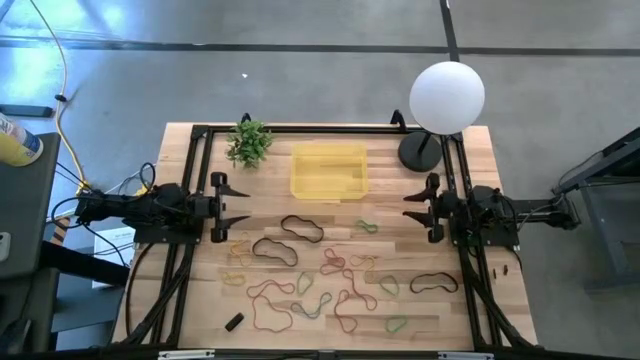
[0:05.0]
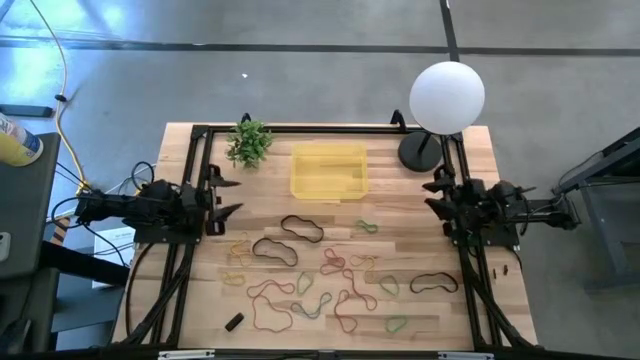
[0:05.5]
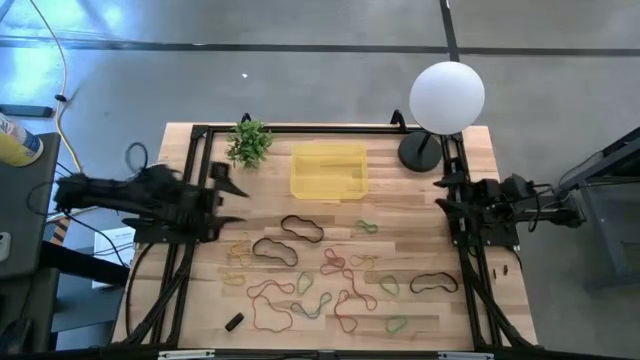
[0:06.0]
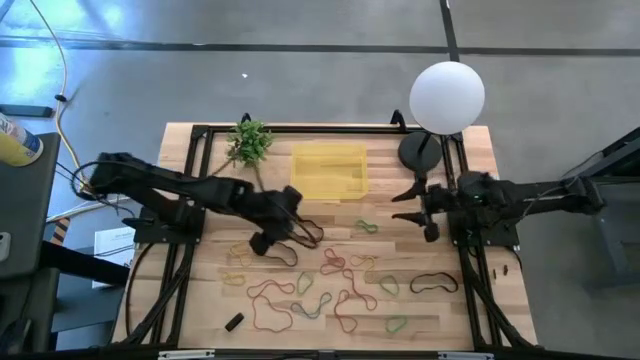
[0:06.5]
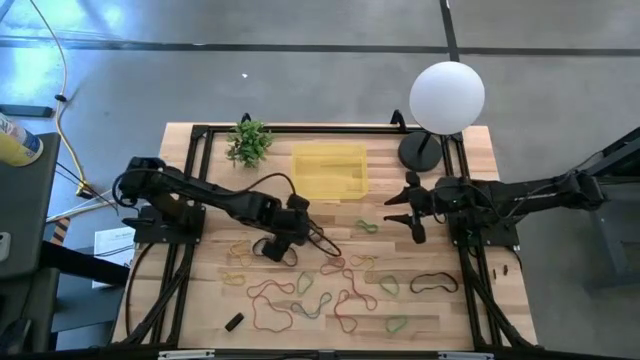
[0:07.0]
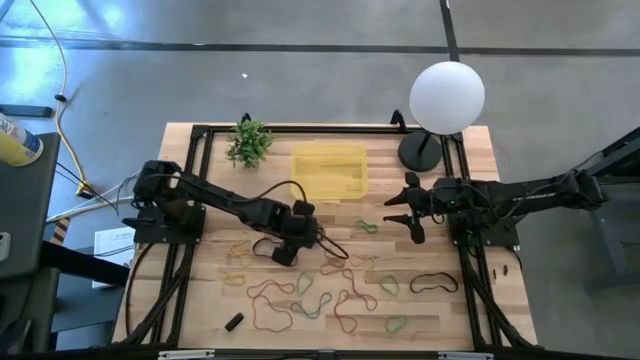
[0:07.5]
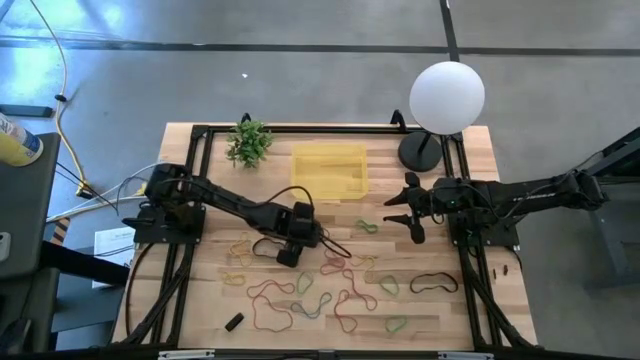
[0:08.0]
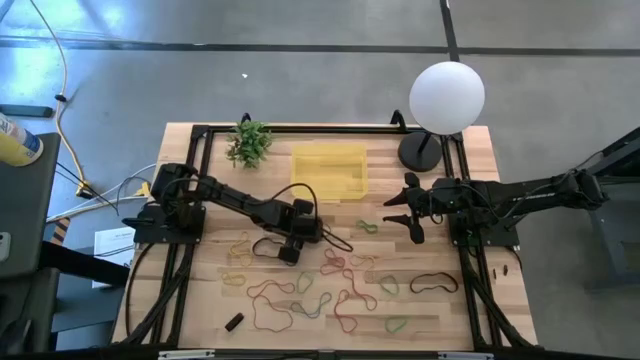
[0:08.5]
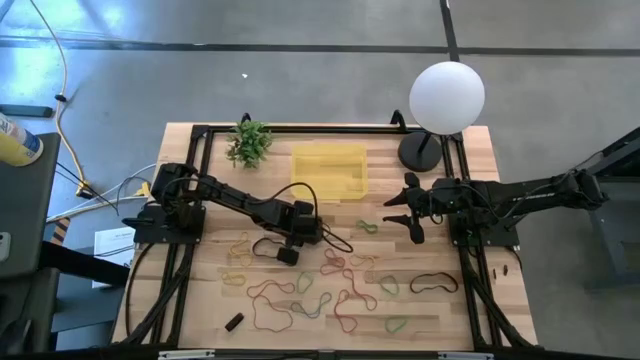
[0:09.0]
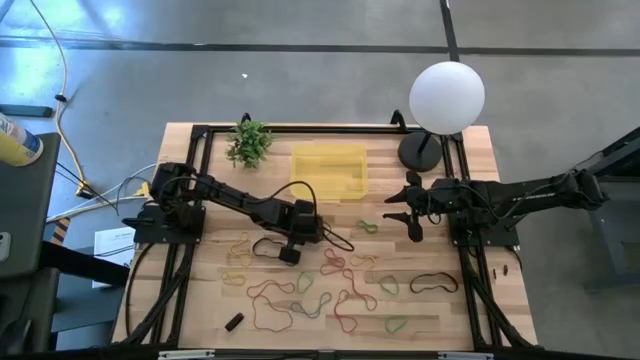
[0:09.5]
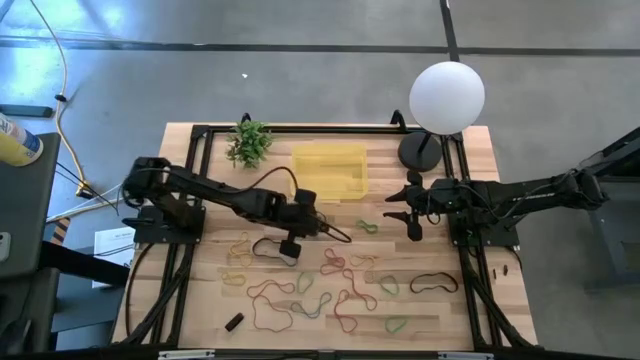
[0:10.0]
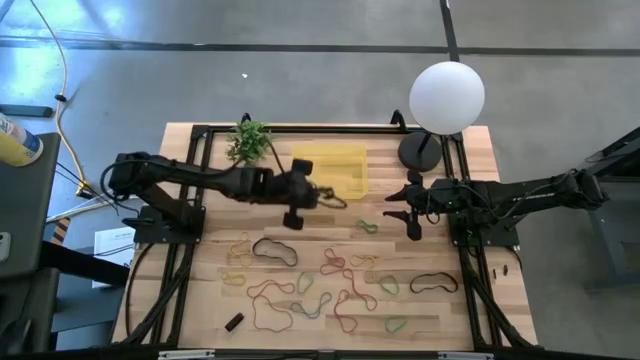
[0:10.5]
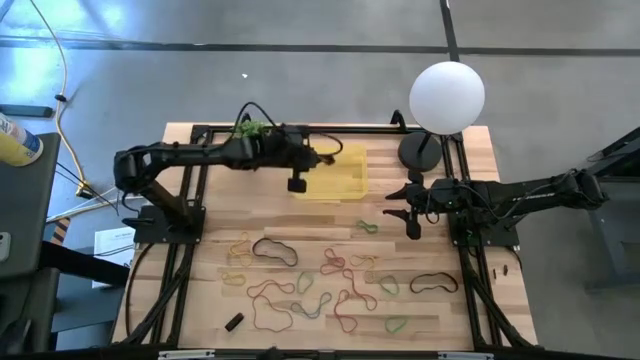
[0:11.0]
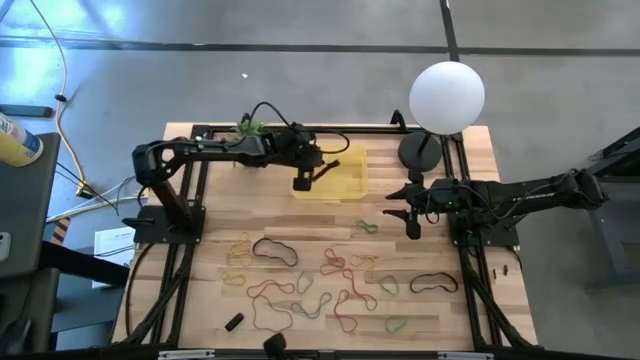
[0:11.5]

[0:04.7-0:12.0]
Task: Pick and place rubber bands into bin
Put the black rubber band into the yellow bin

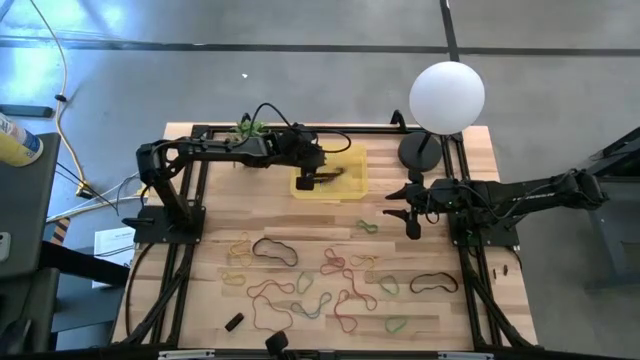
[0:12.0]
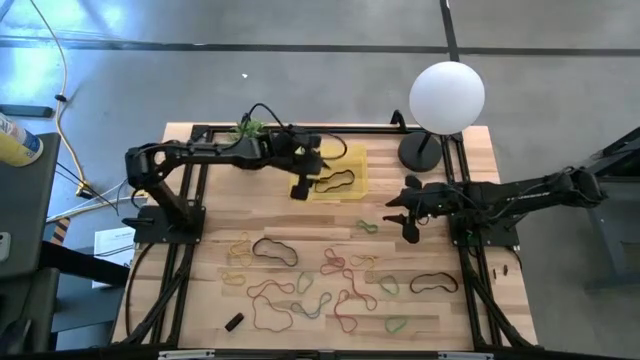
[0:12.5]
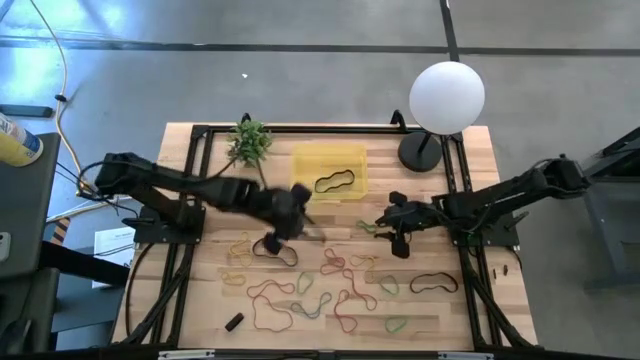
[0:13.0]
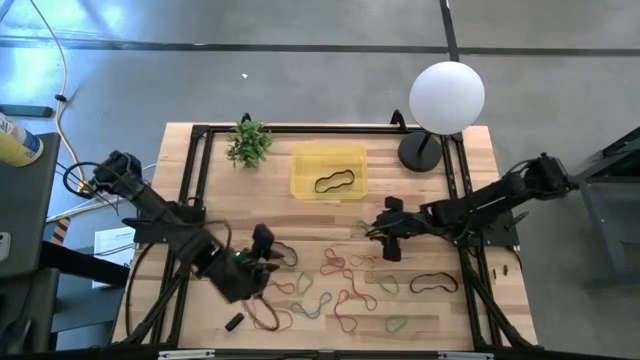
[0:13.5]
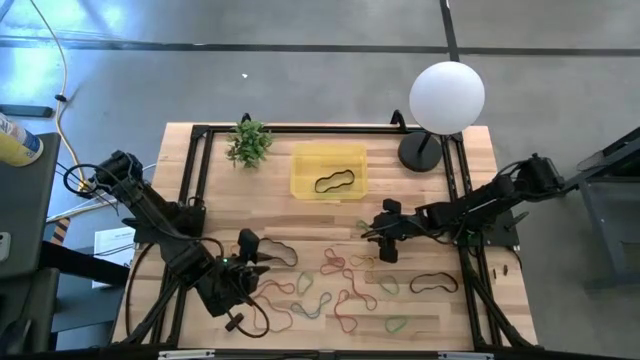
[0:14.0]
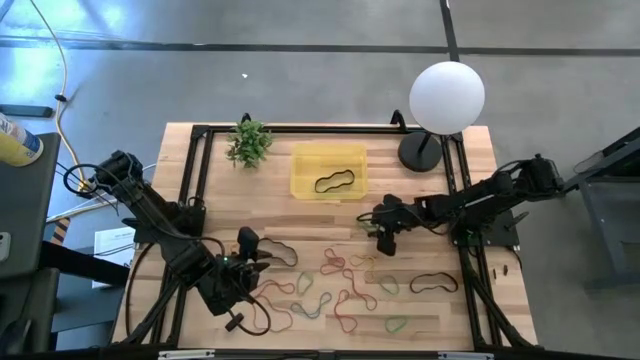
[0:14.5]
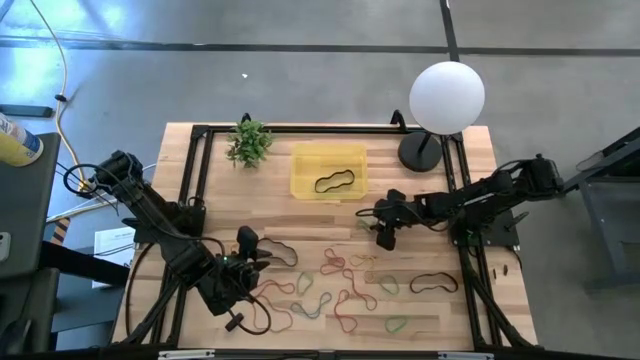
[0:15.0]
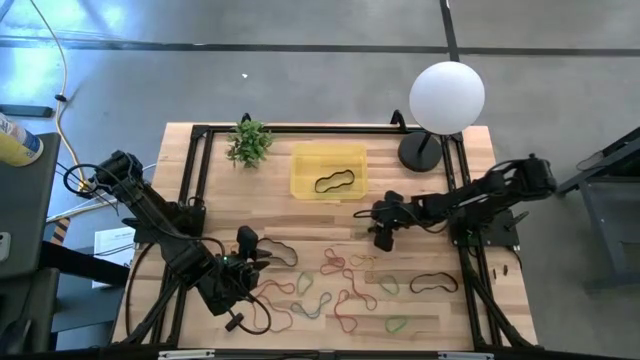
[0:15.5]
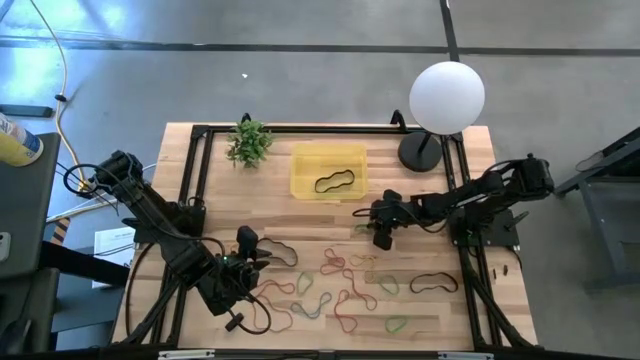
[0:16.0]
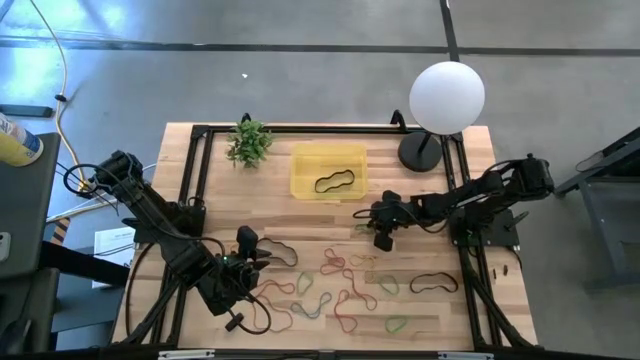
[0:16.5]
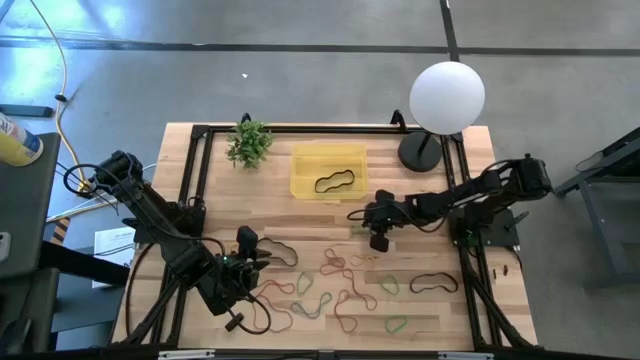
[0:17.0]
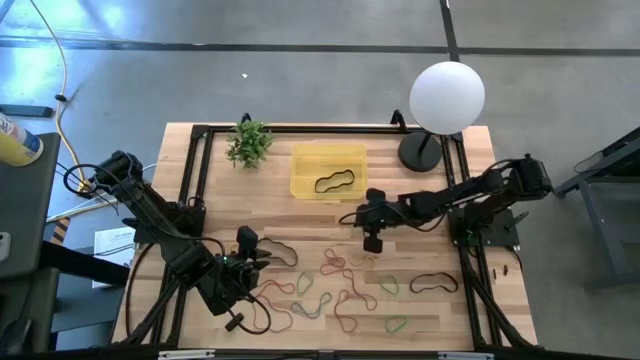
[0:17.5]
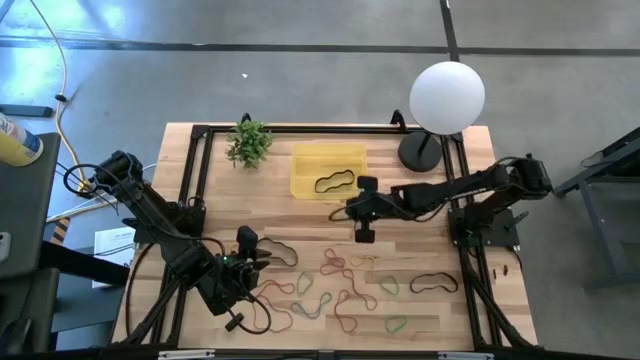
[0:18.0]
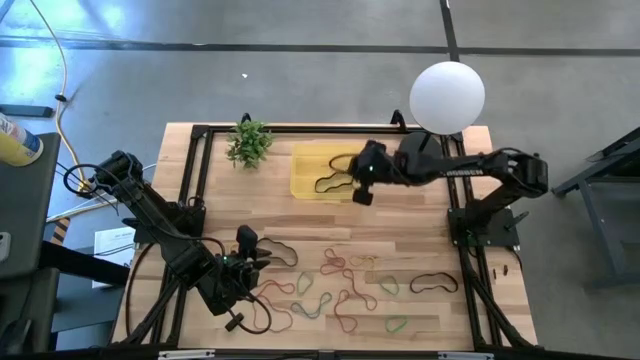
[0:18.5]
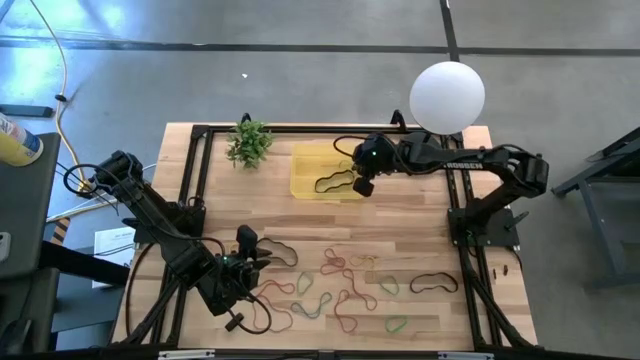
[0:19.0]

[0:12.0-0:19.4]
Put the green rubber band into the yellow bin

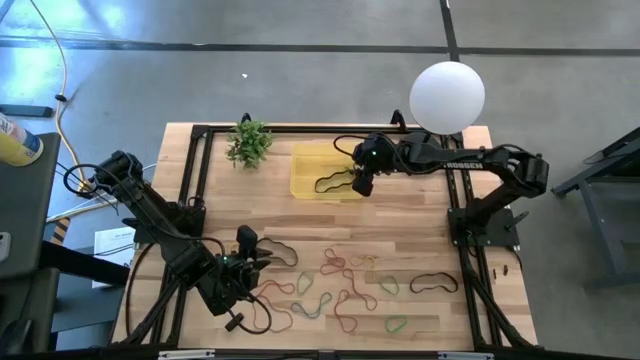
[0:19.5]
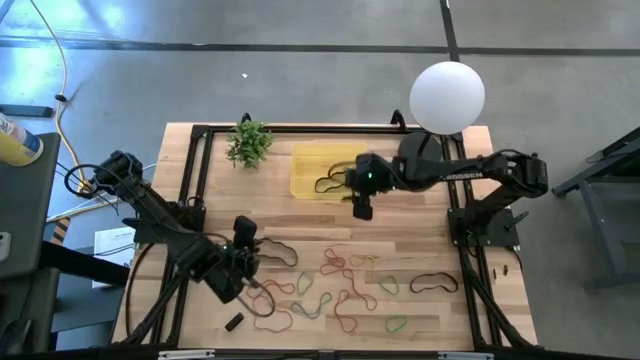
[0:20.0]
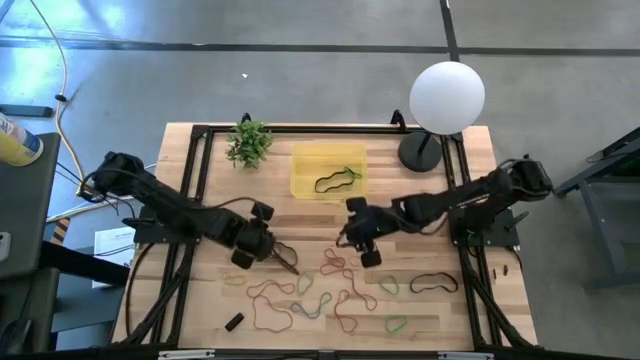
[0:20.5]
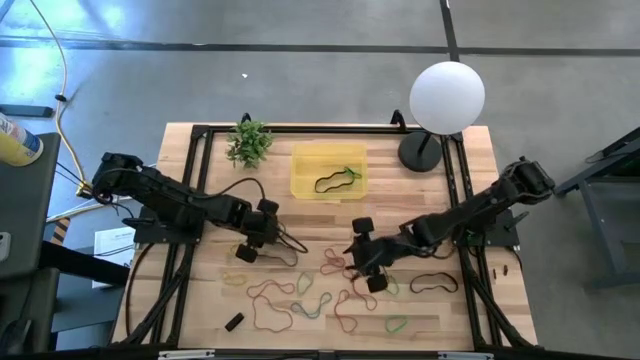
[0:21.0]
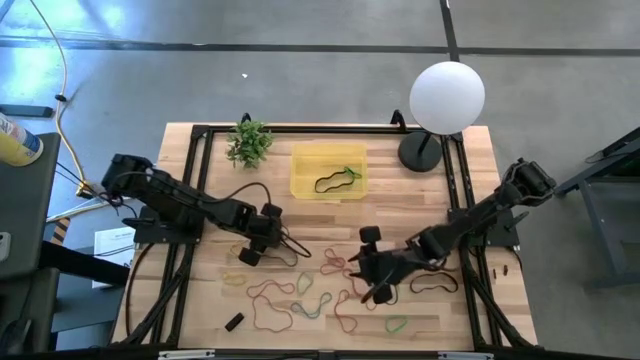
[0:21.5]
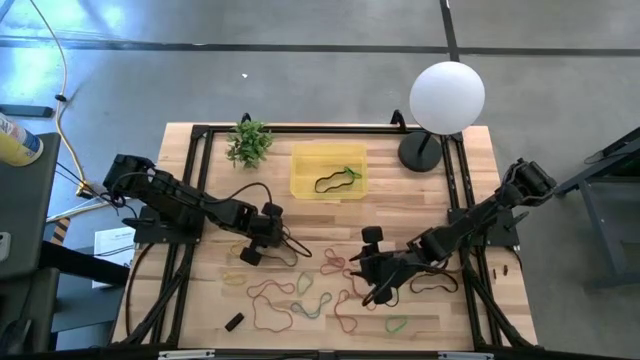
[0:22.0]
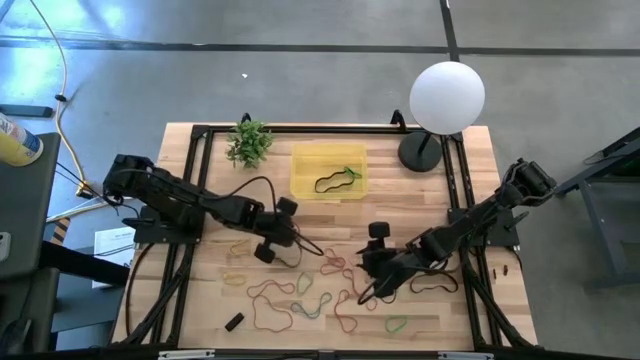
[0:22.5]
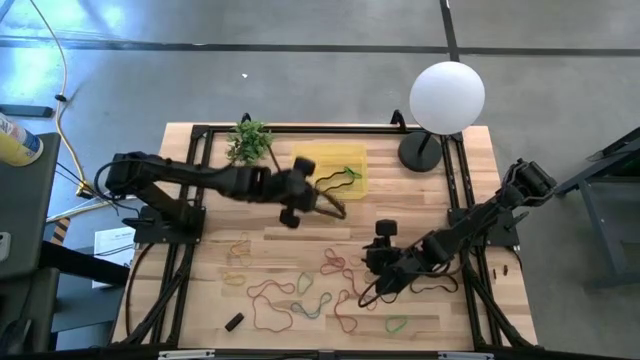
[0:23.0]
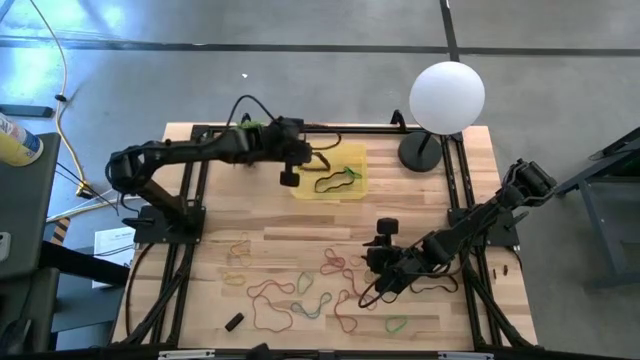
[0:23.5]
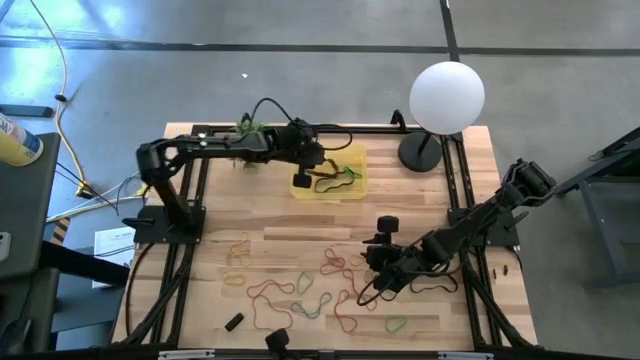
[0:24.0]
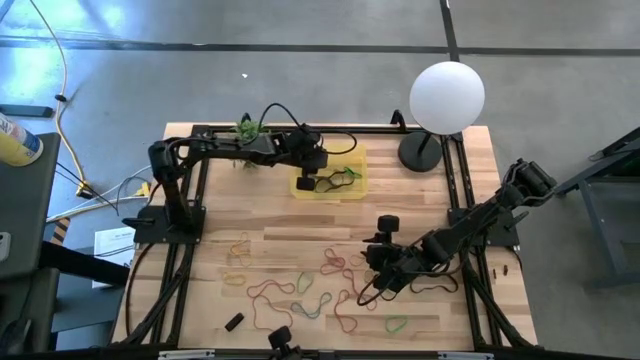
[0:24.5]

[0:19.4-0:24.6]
Put the top black rubber band into the yellow bin
